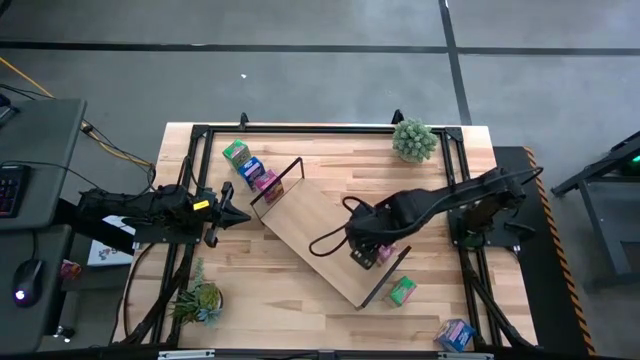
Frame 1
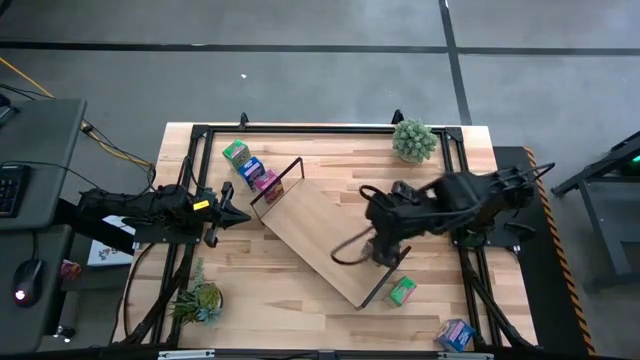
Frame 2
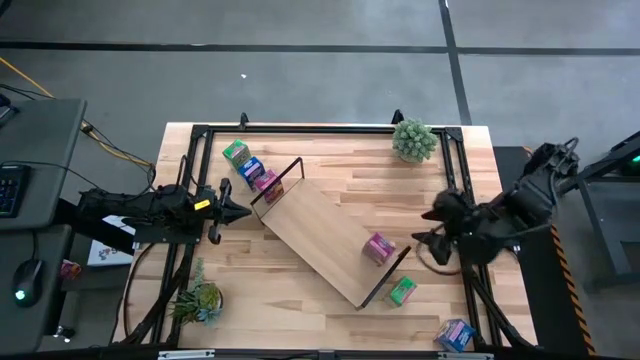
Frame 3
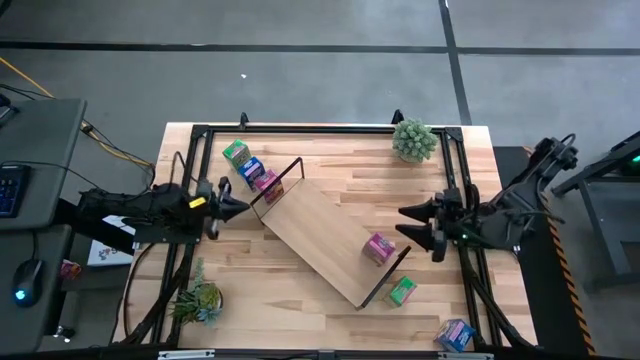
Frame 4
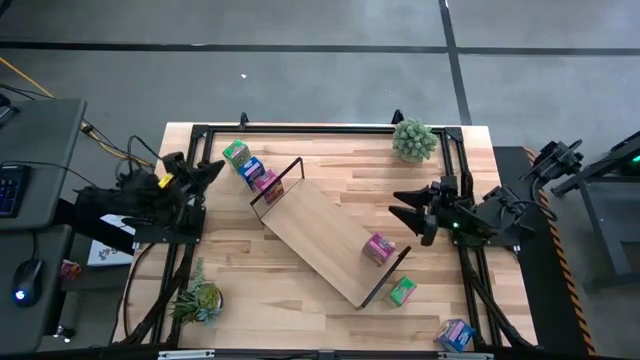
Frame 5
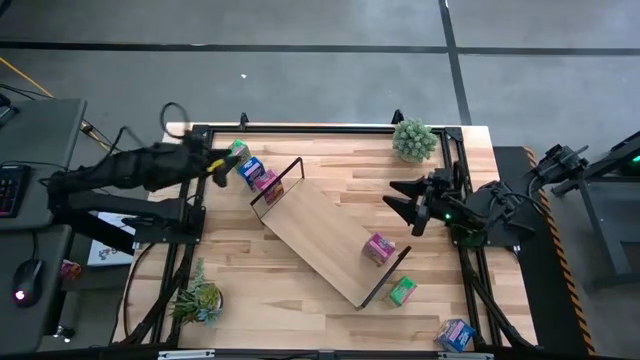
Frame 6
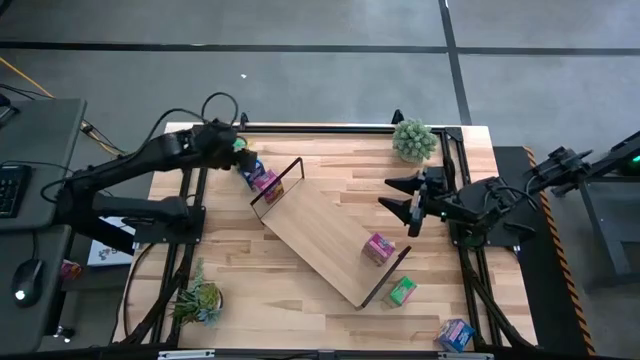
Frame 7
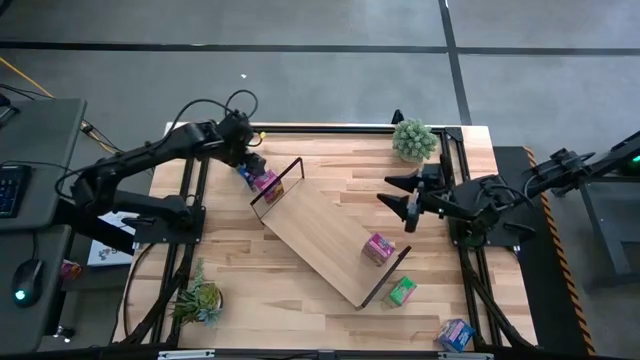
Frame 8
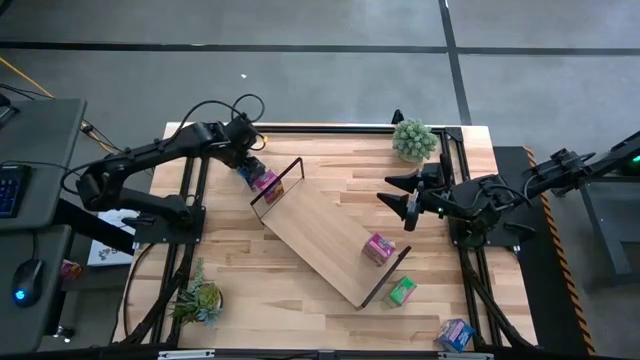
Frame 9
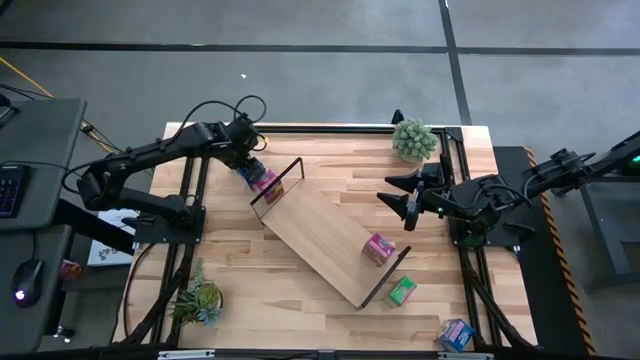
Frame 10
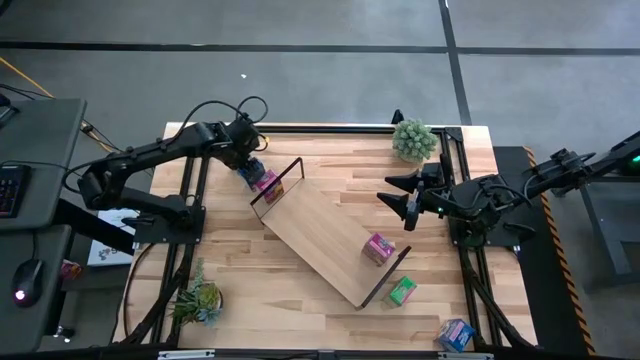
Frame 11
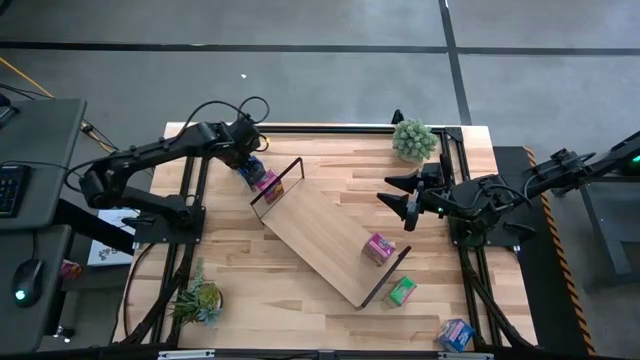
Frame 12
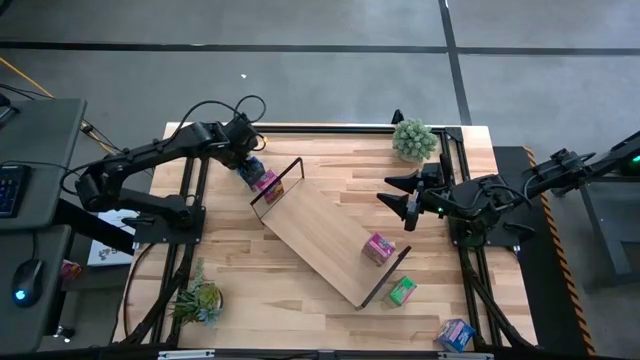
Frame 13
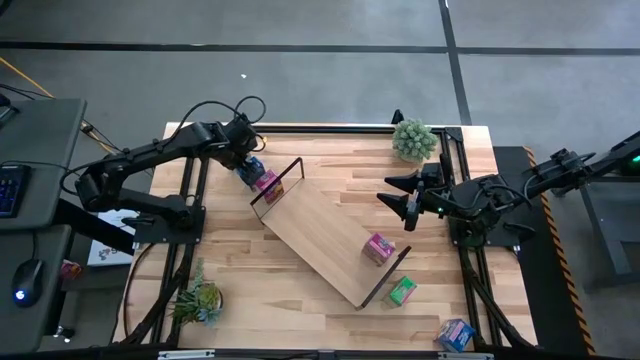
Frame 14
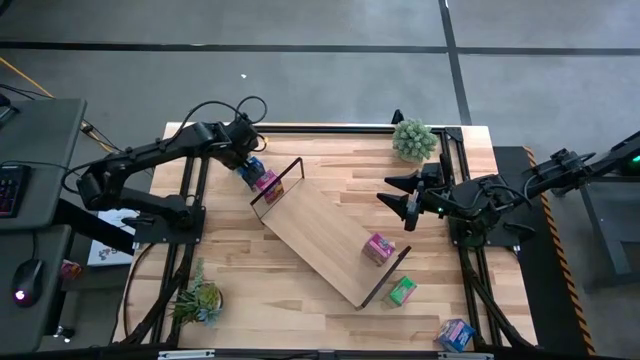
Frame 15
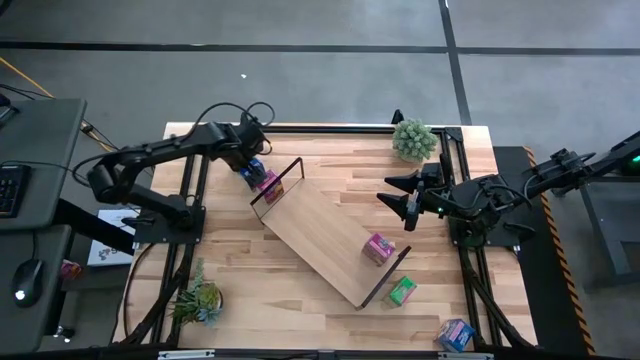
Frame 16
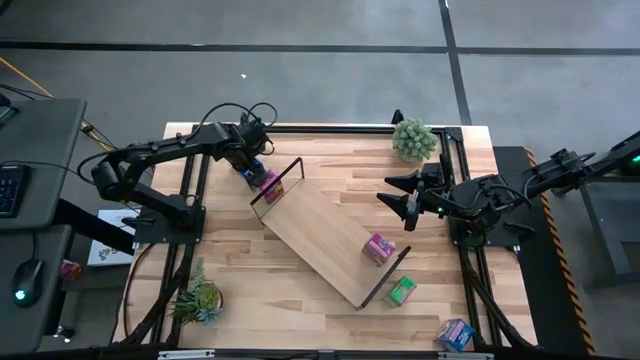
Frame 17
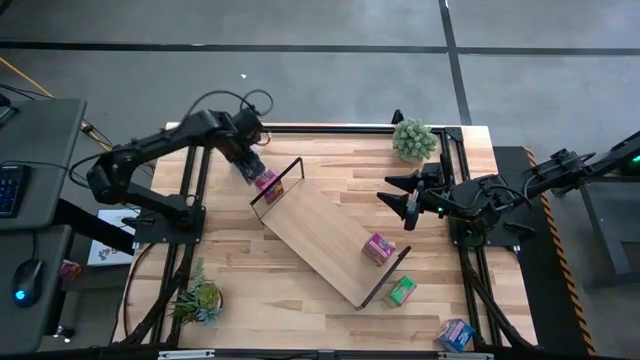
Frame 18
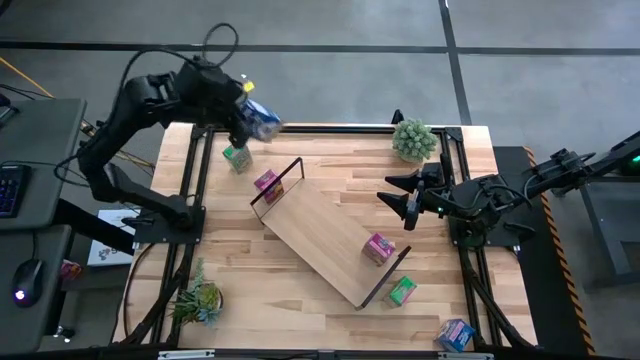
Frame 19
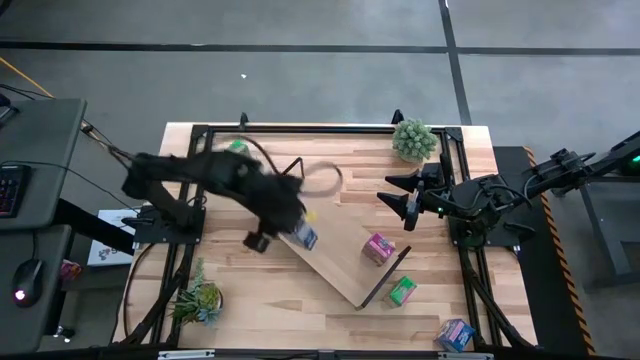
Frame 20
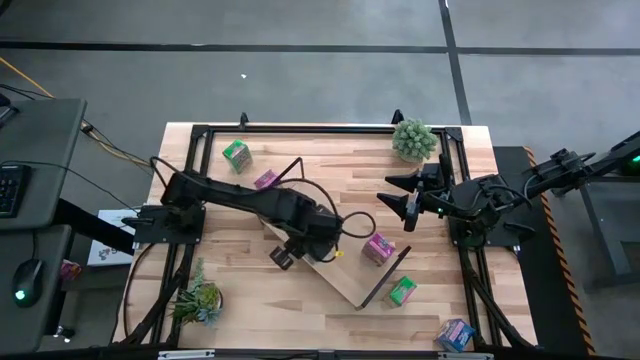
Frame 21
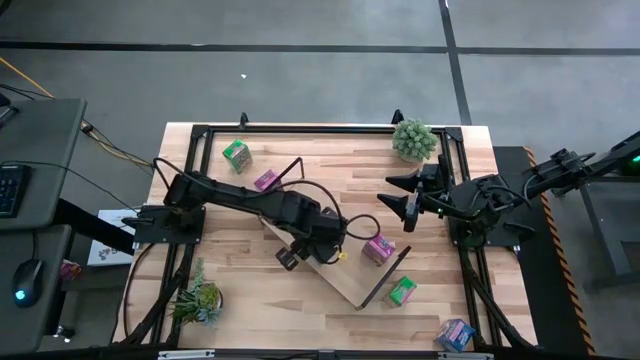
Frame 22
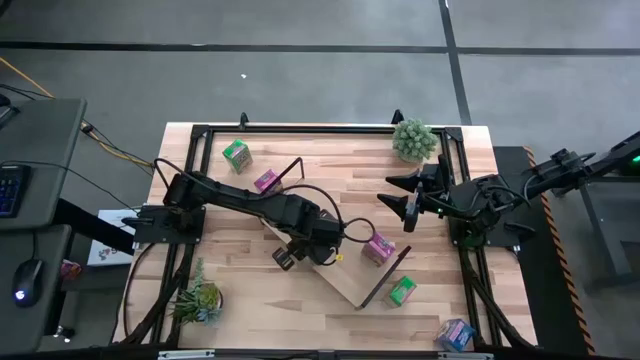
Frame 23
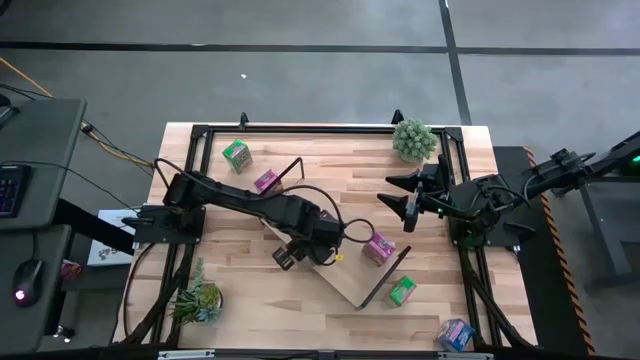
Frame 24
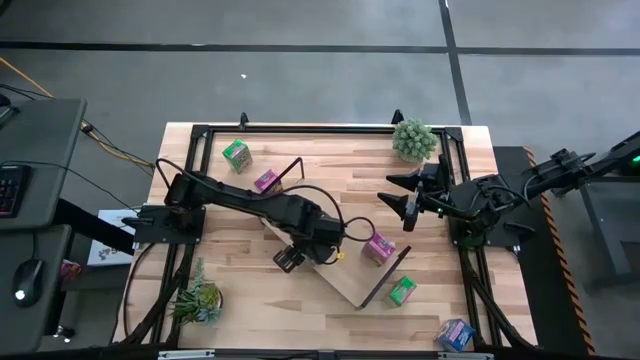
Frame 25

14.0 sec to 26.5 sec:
Task: Stack cereal on shelf
Put the left blue cereal box on the shelf

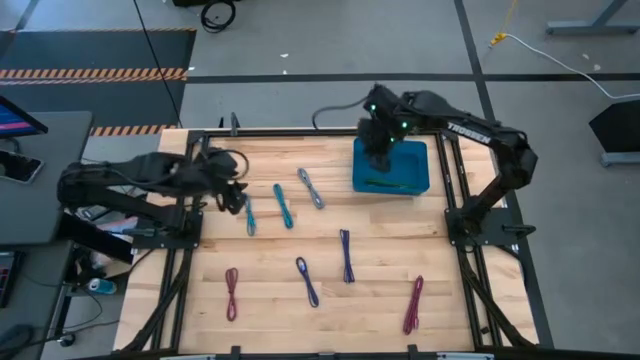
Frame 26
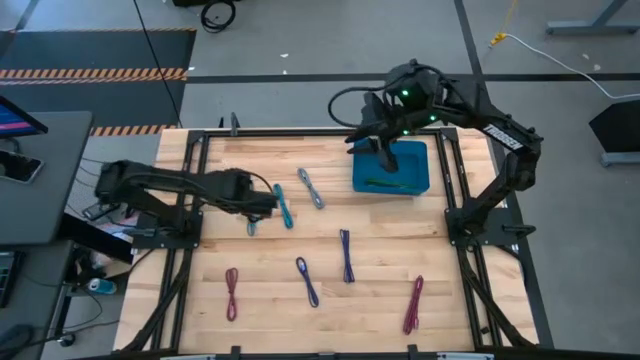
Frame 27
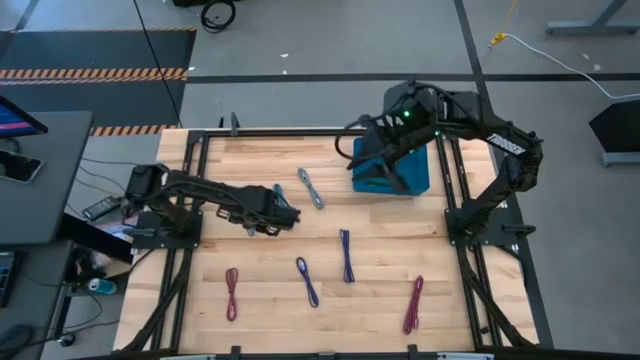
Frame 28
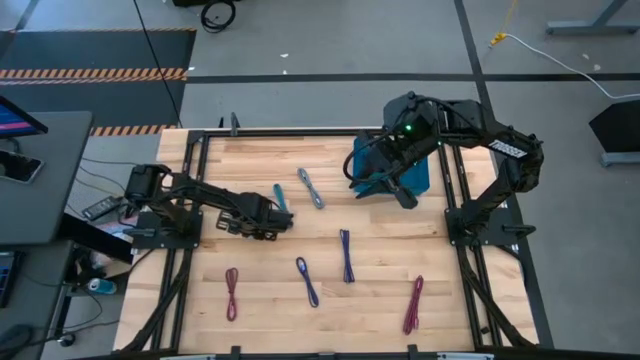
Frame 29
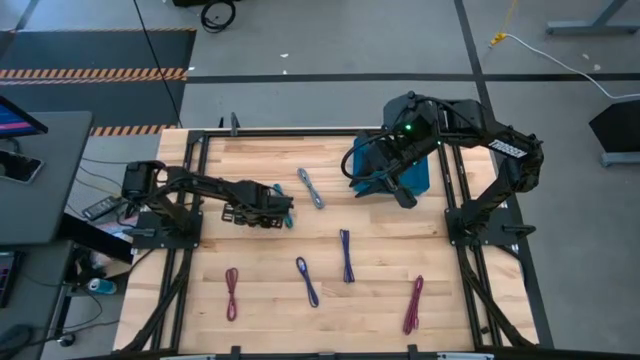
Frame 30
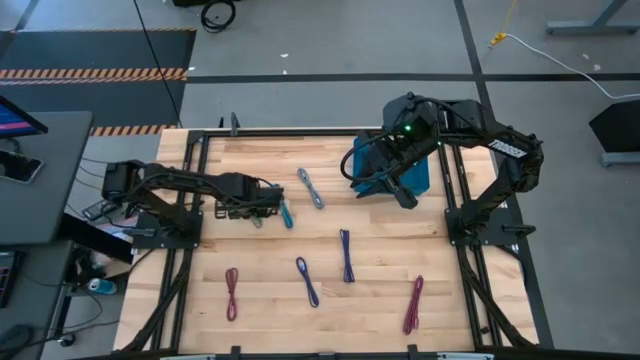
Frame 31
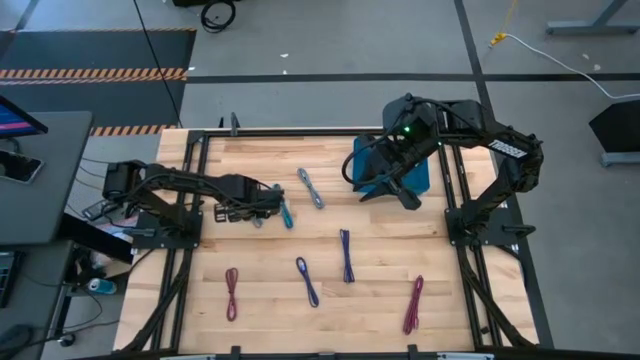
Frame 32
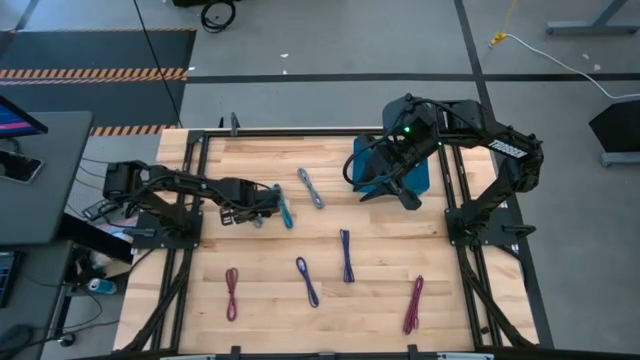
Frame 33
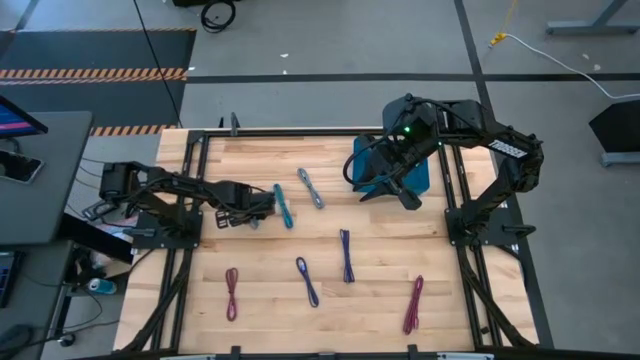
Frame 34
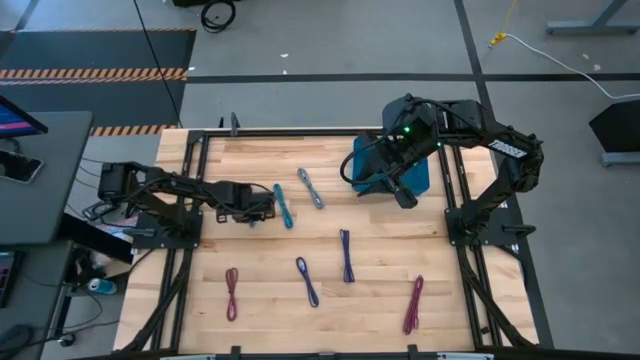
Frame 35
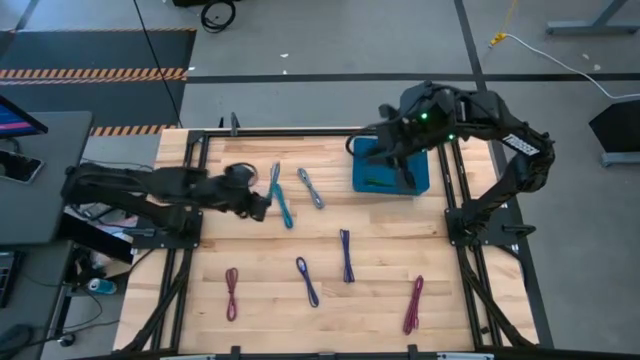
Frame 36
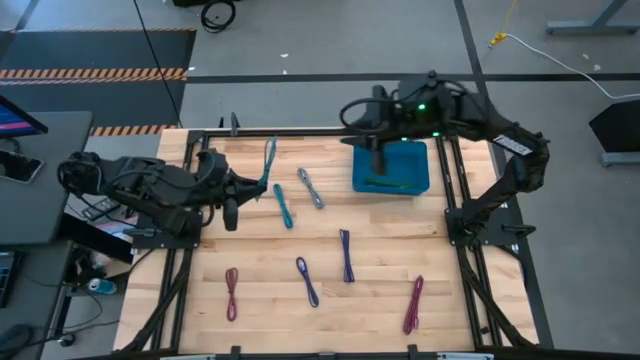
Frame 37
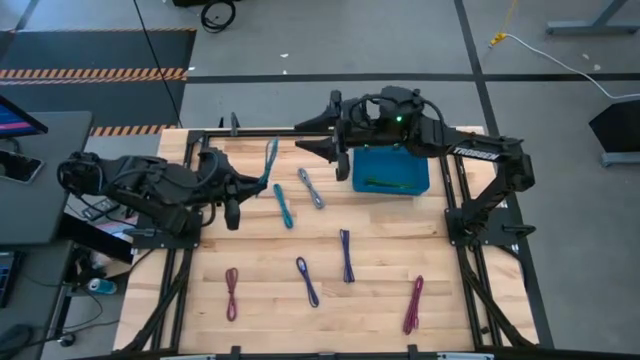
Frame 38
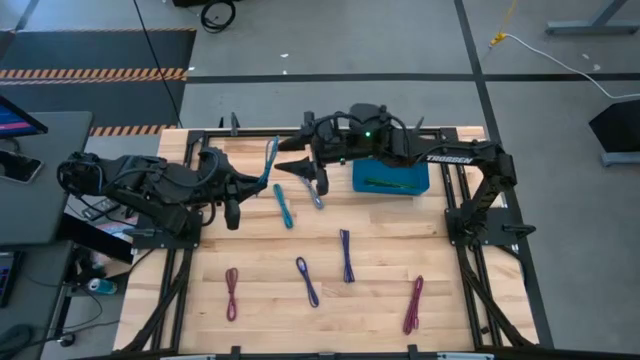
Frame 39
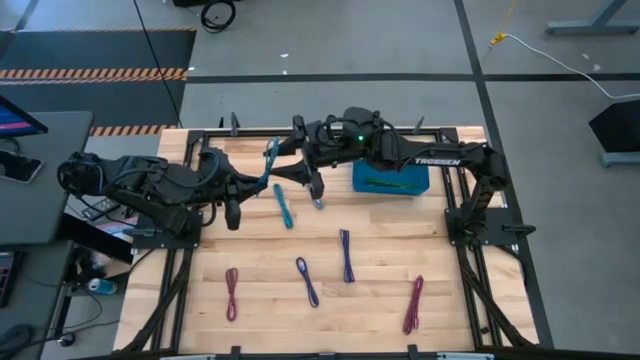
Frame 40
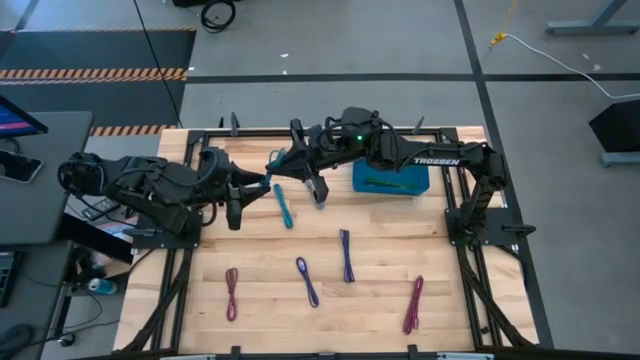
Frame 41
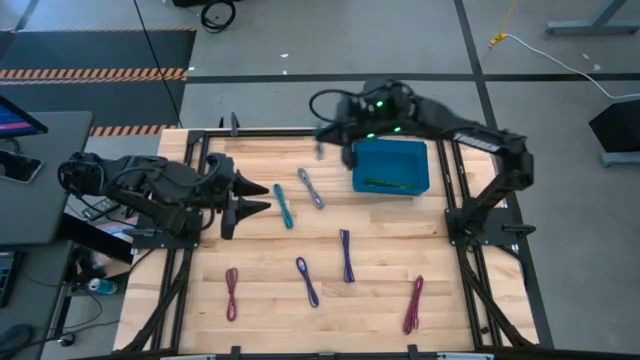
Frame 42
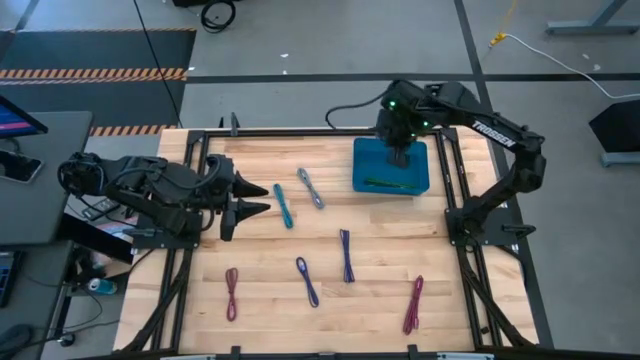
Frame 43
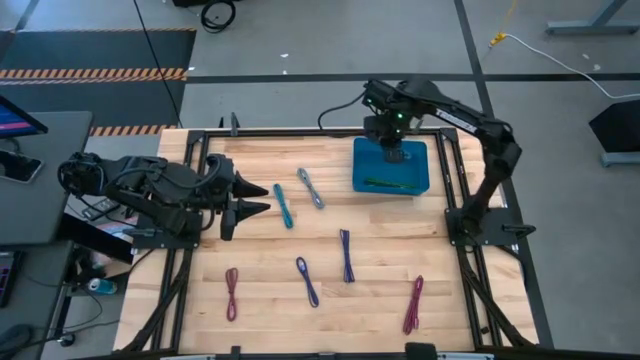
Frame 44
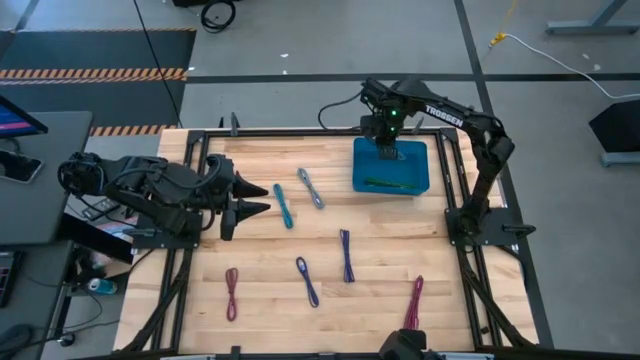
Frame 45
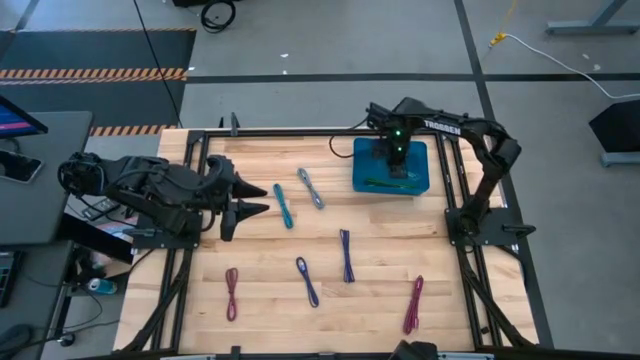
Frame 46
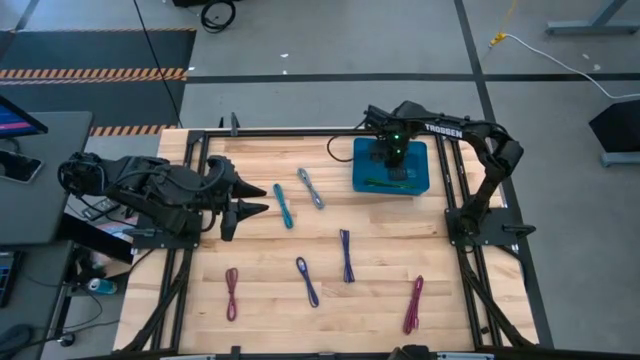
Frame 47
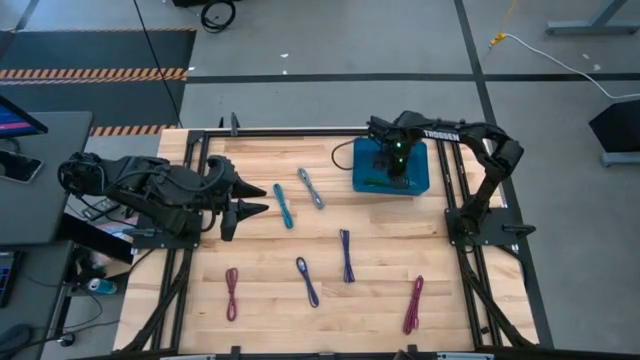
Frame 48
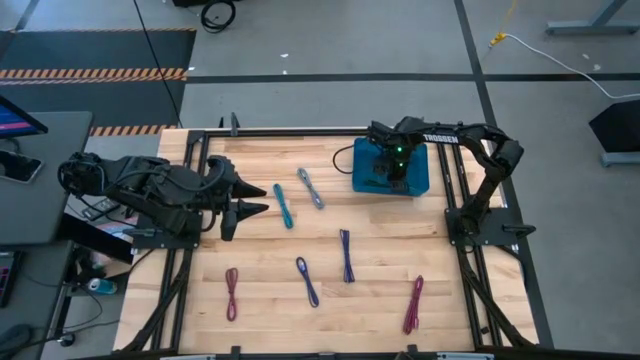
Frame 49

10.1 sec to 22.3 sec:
Task: Pick and place USB-C Cables
Put the left black blue charger cable into the blue bin
